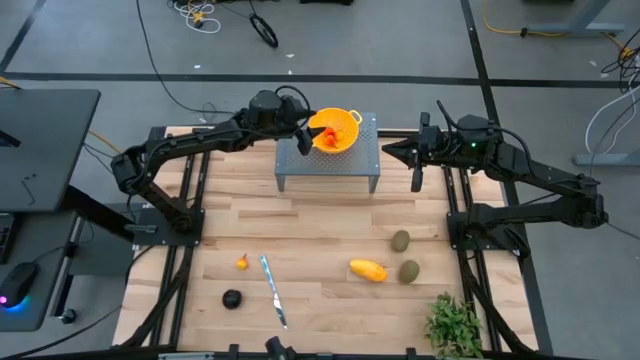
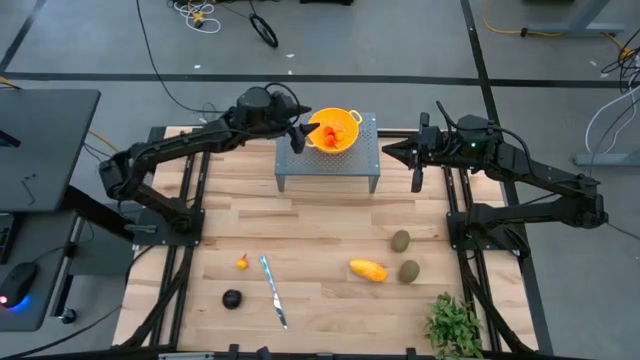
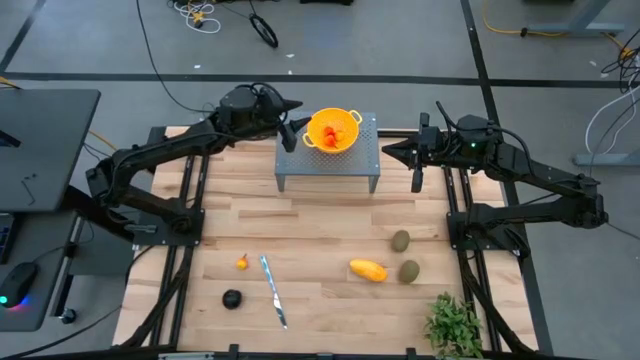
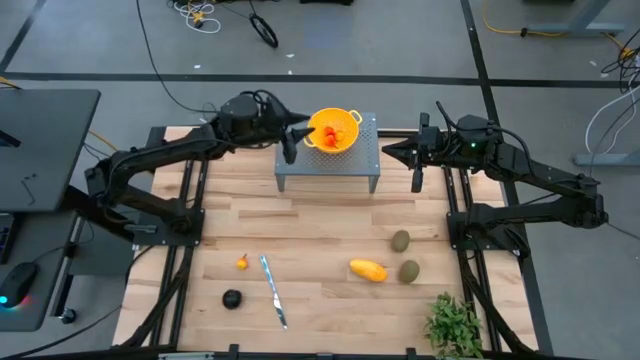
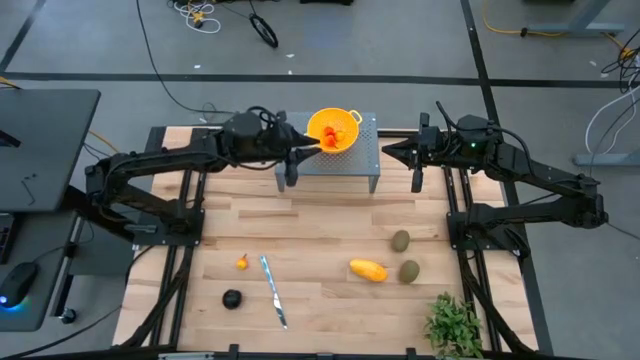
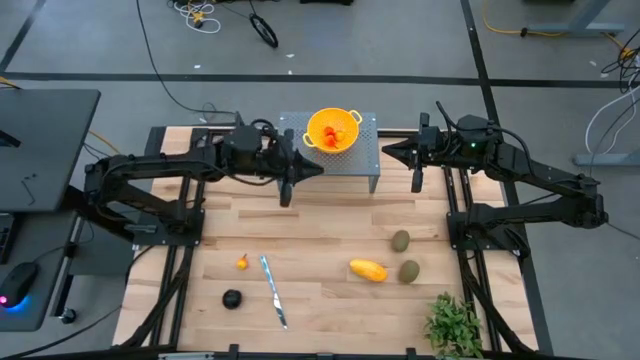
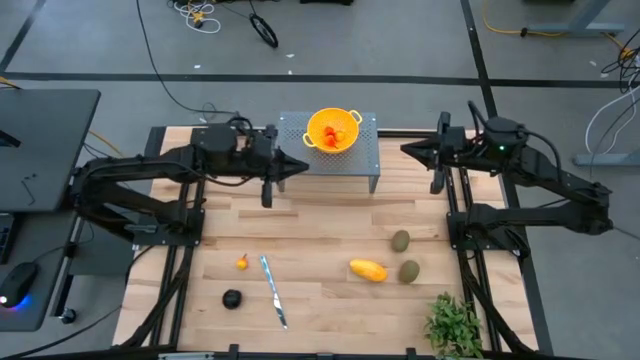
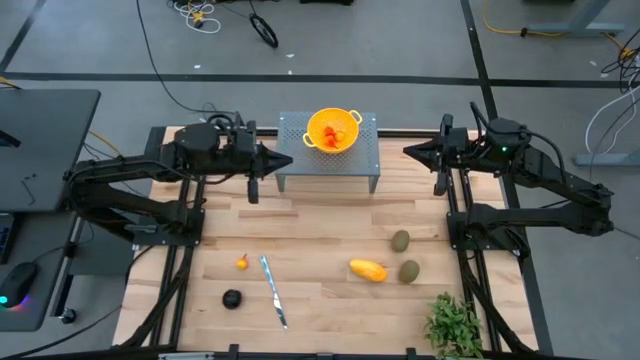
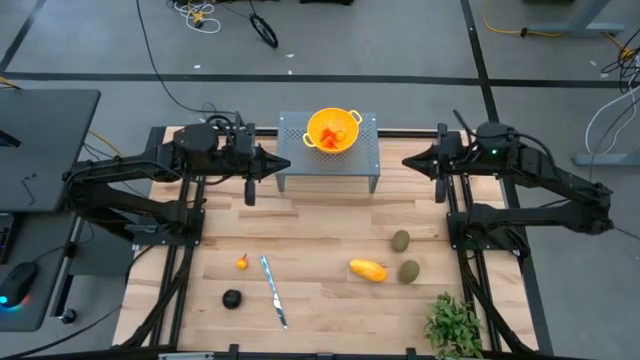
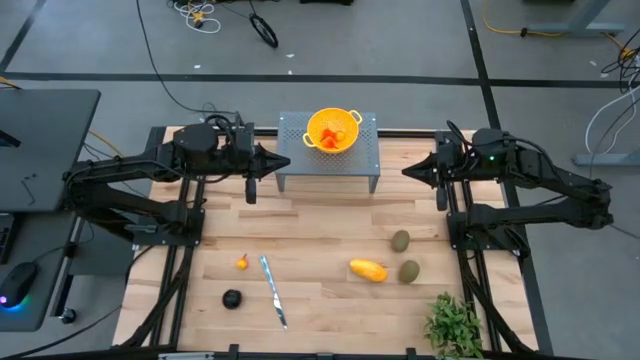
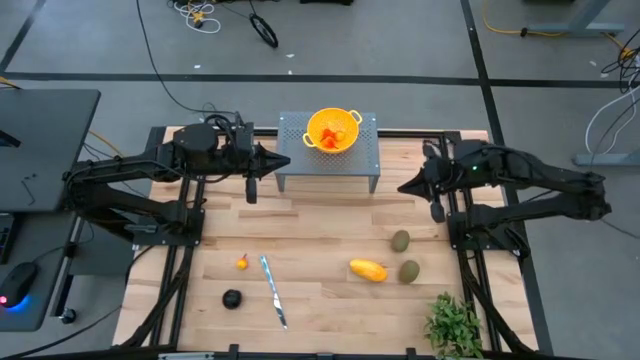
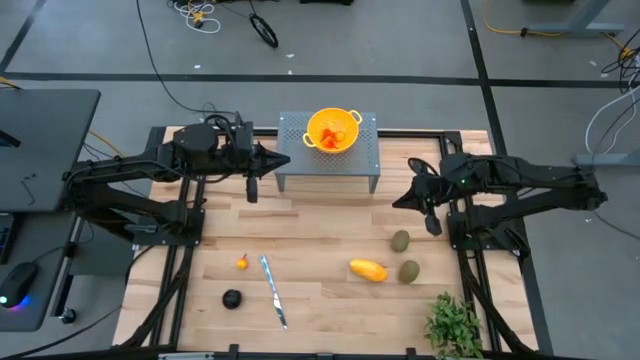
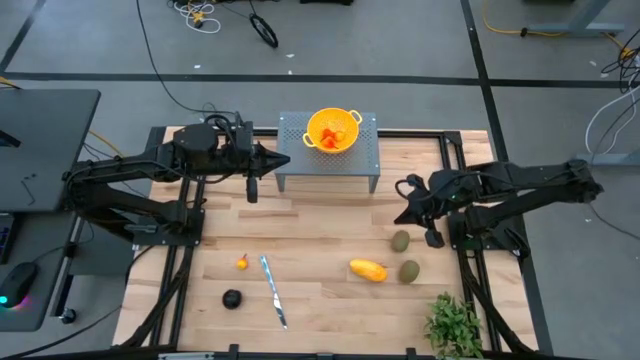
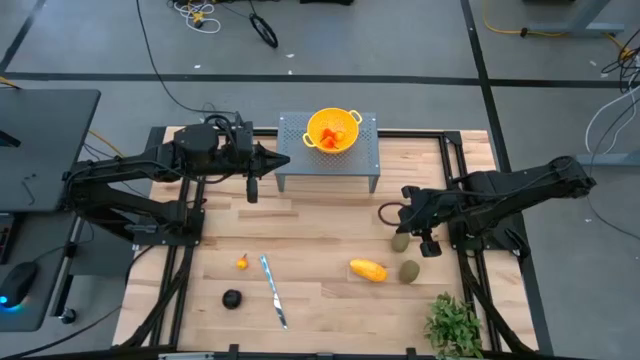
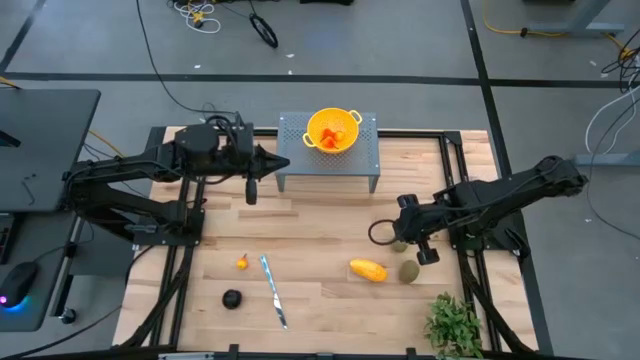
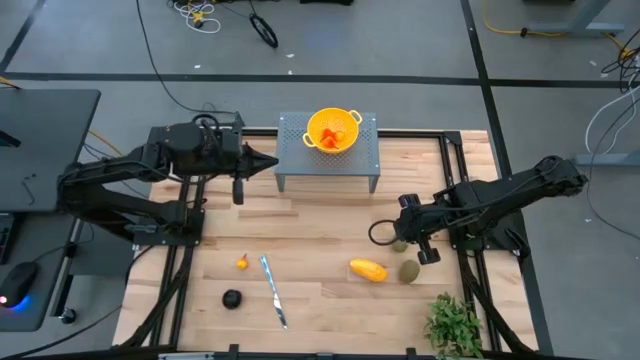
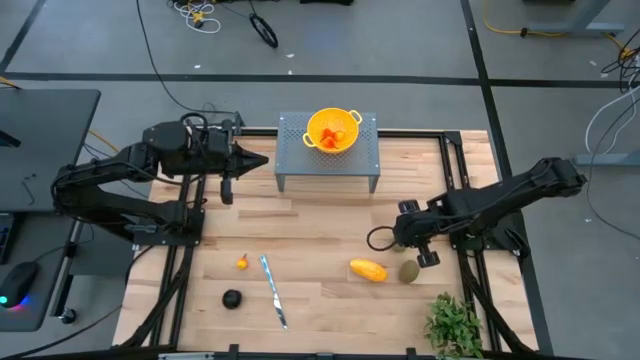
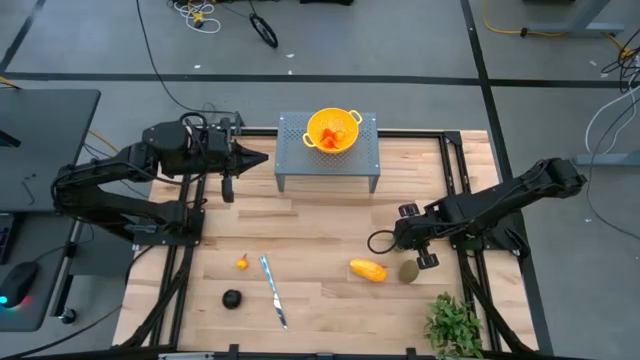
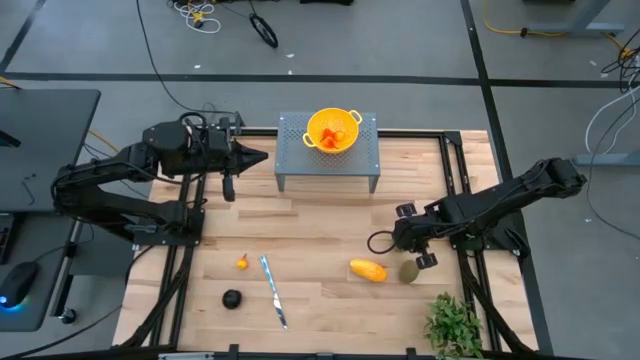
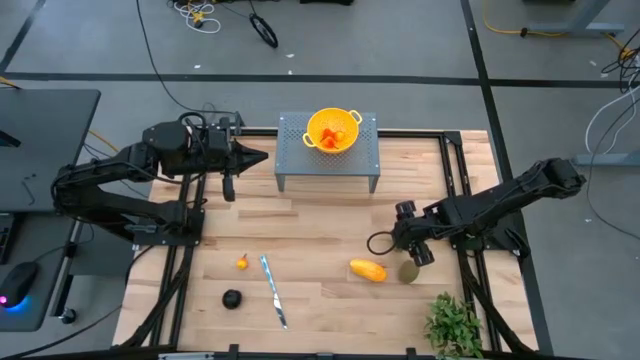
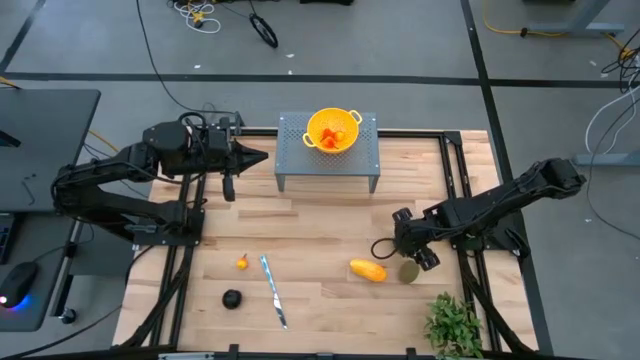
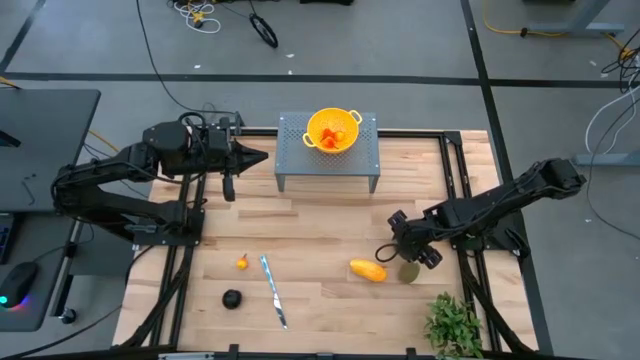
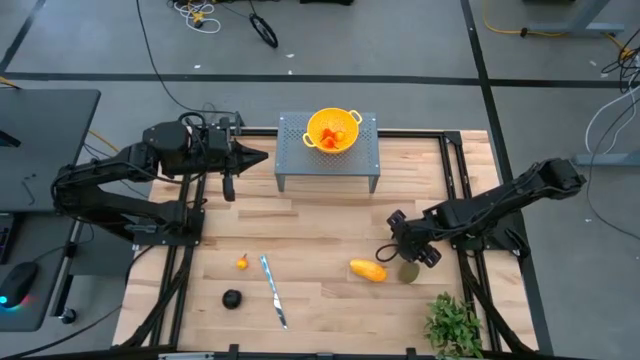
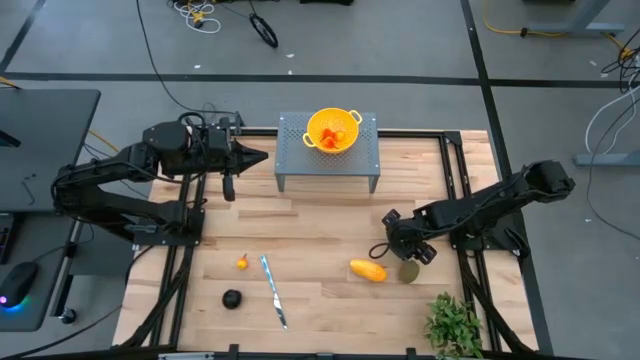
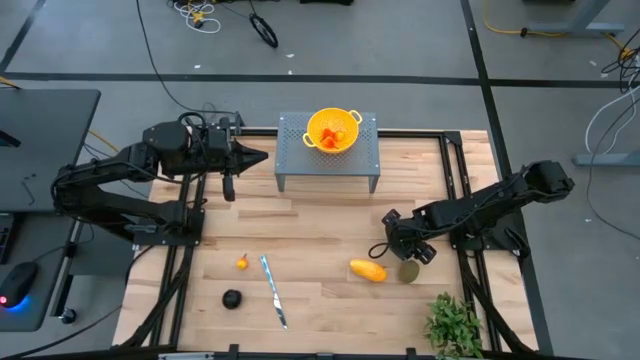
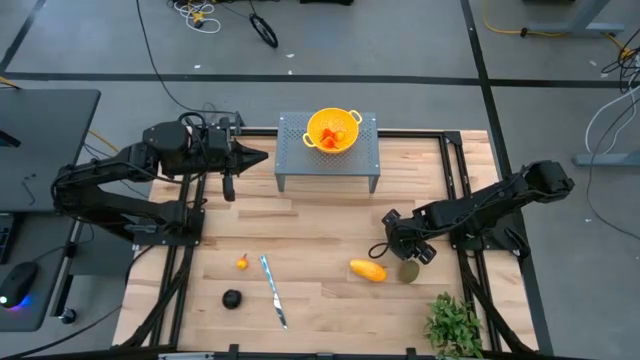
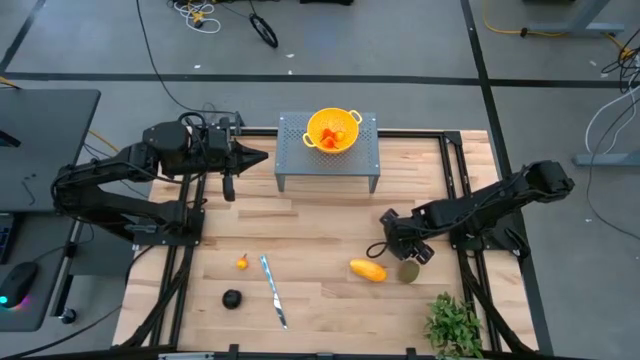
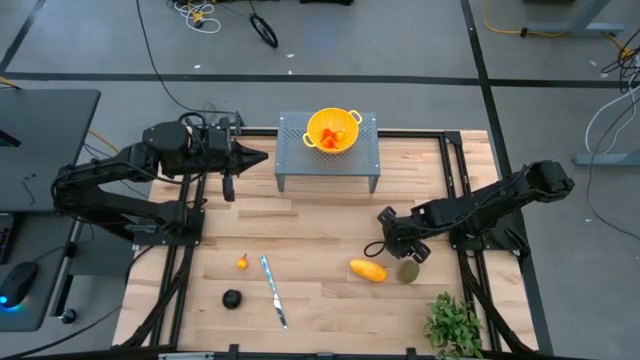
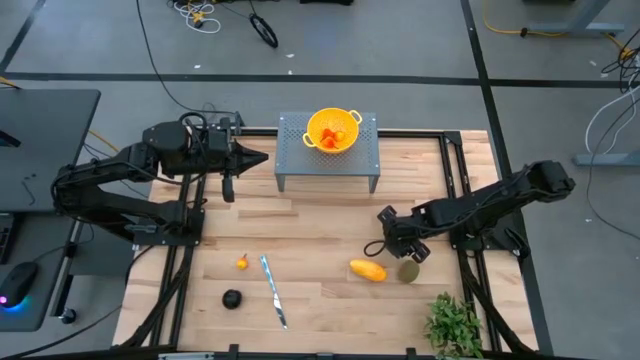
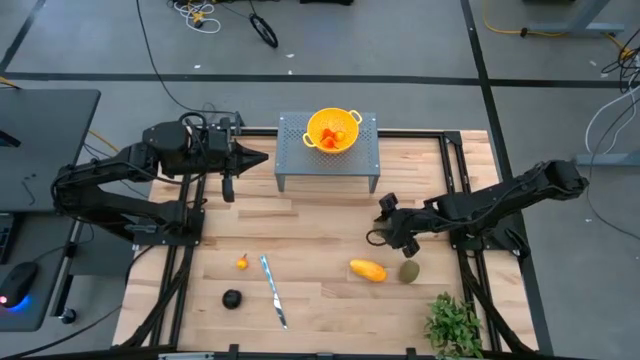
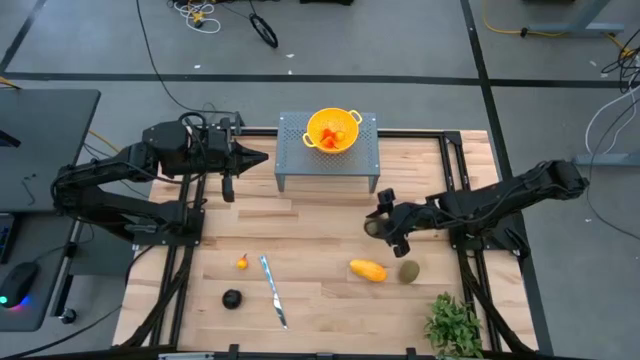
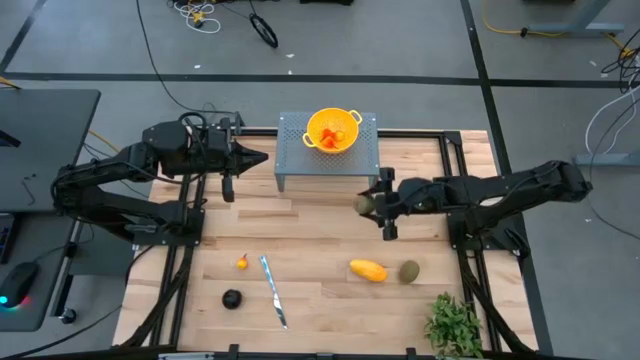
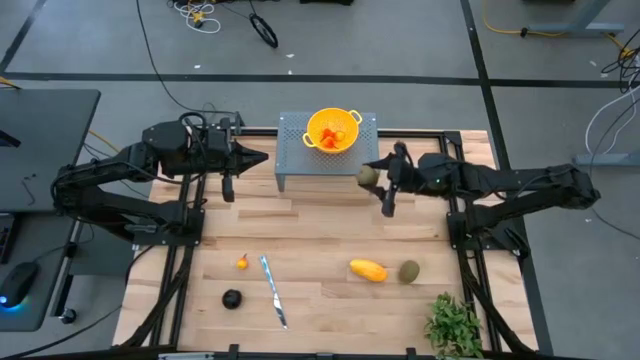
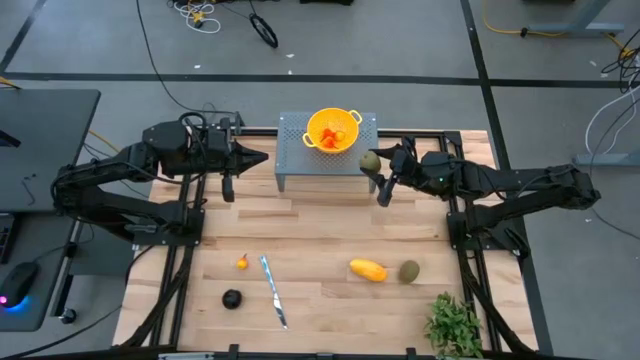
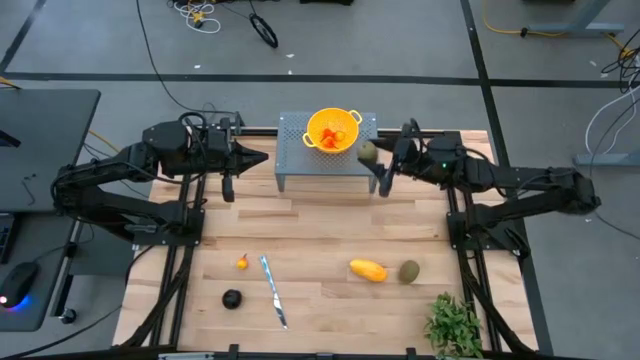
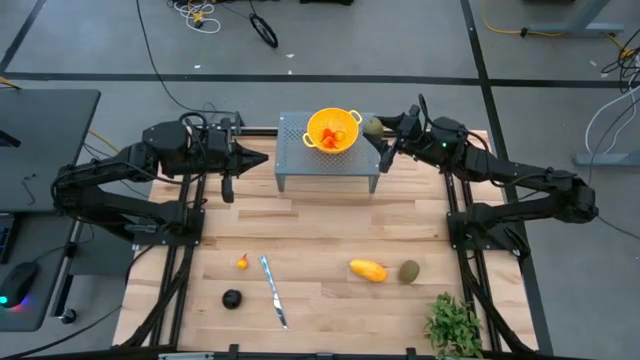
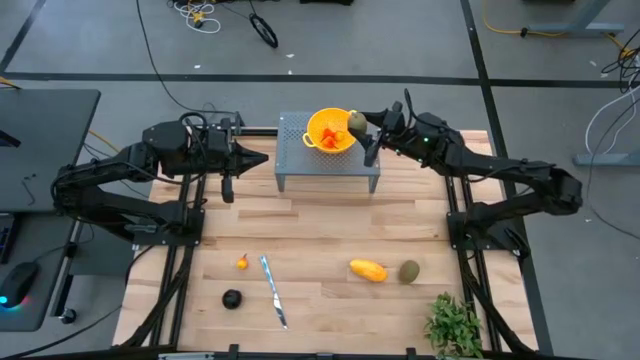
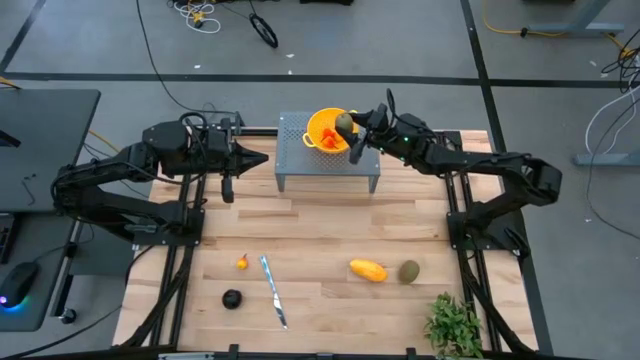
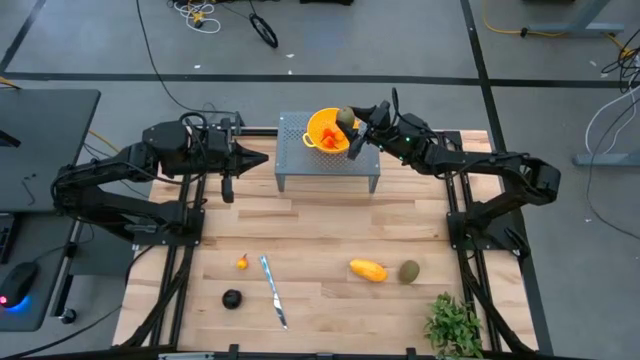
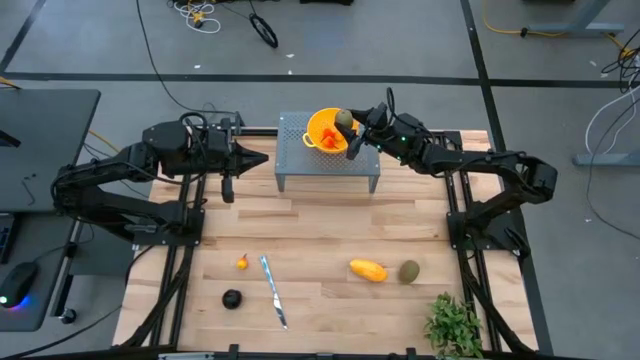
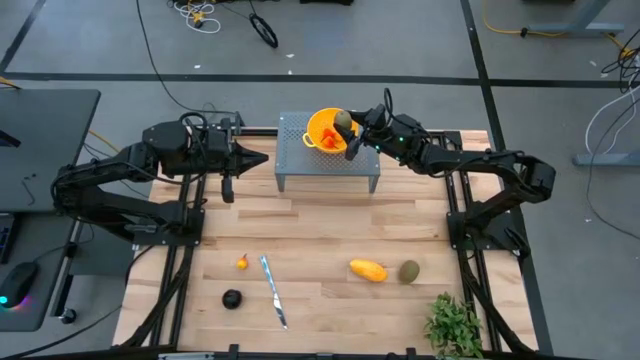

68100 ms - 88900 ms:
Task: Pick & Place Fruit
Put the kiwi into the colander bowl on the shelf

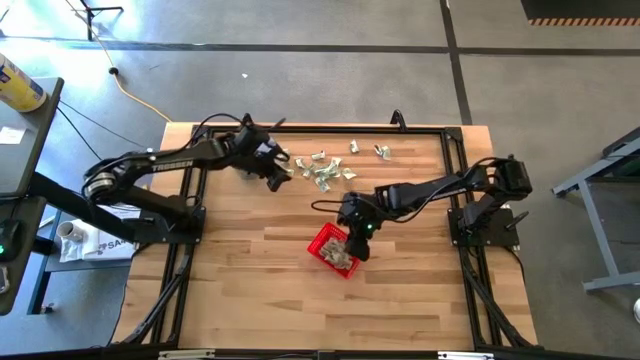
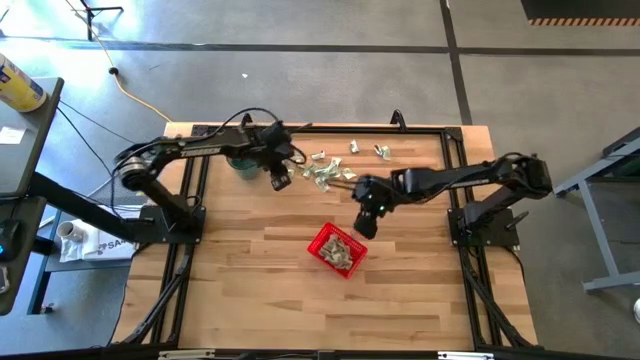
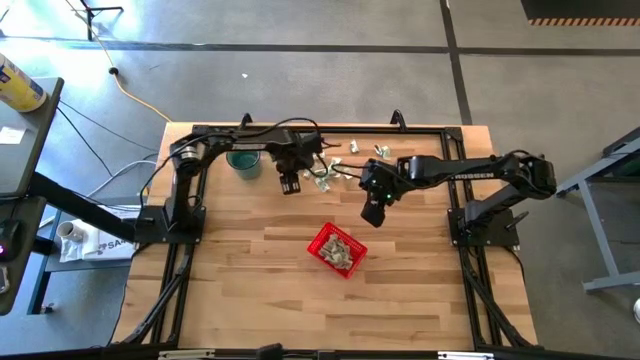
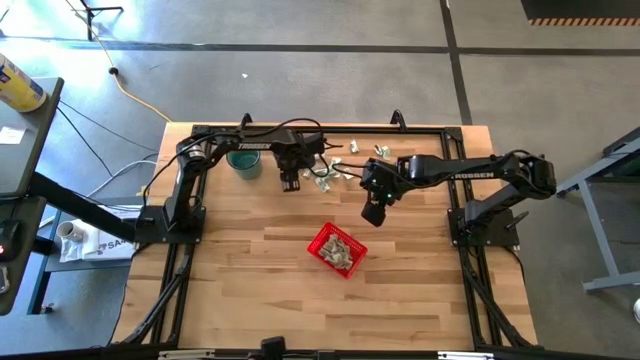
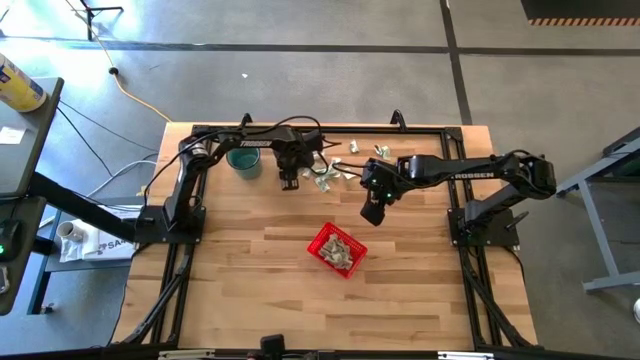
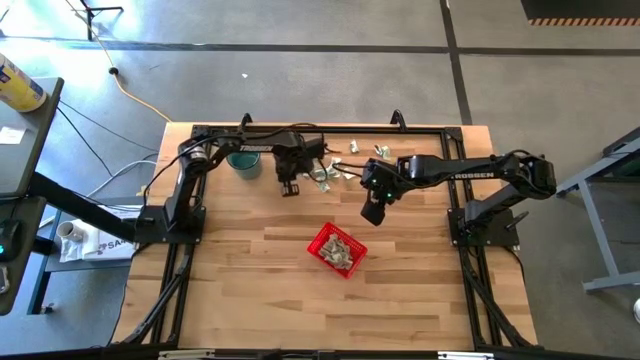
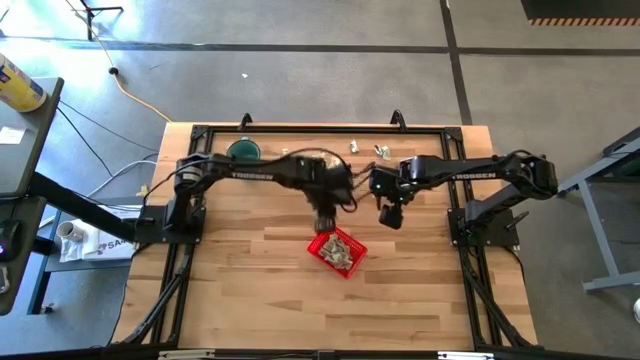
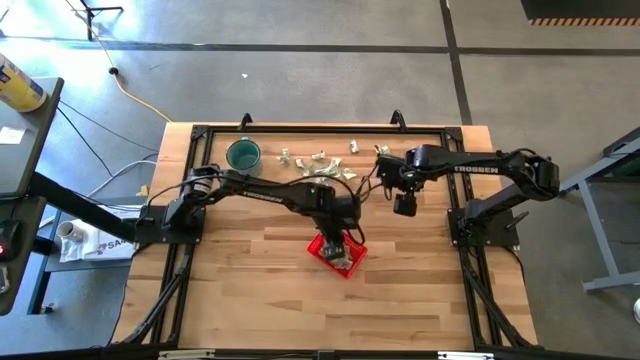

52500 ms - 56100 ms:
Task: Pick and place Stevia / Truvia into bins
Put the light green stevia packet into the bin
